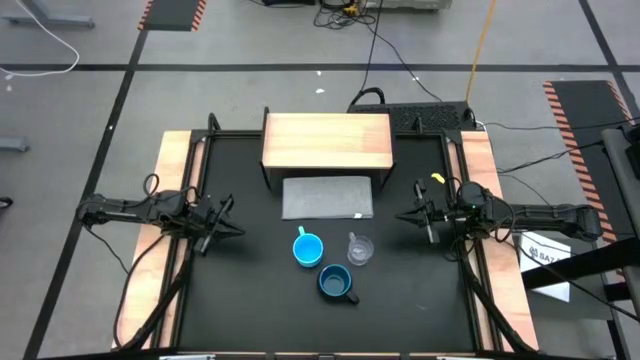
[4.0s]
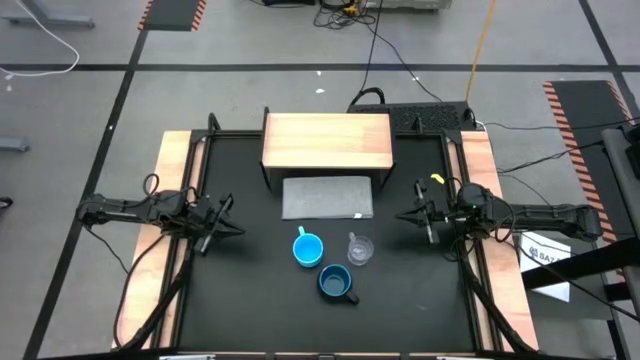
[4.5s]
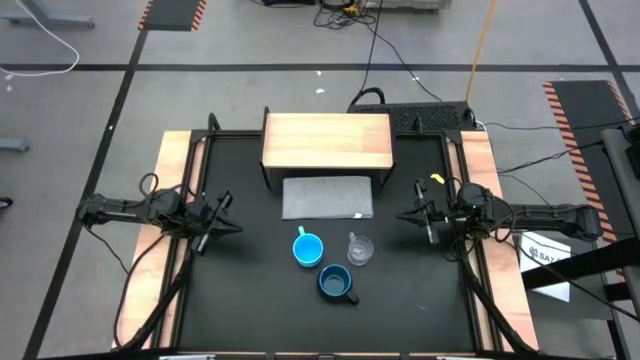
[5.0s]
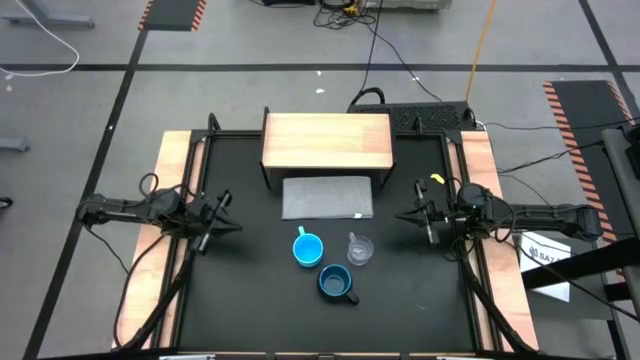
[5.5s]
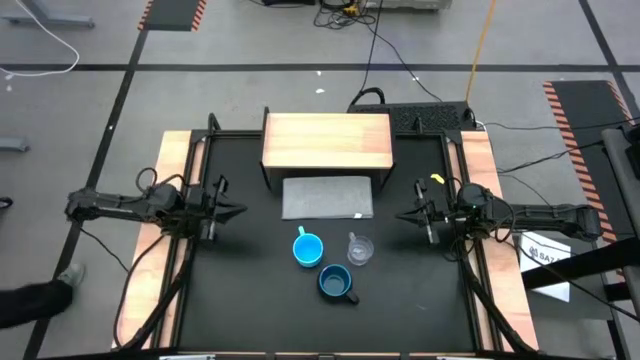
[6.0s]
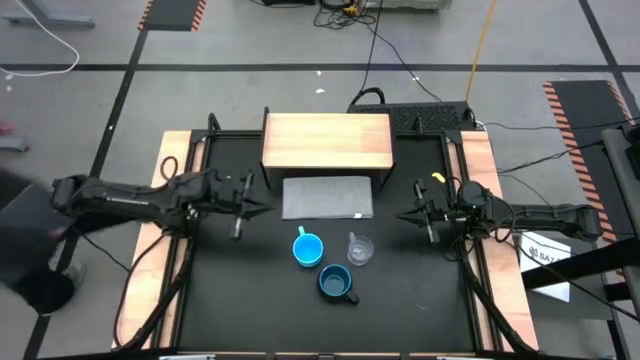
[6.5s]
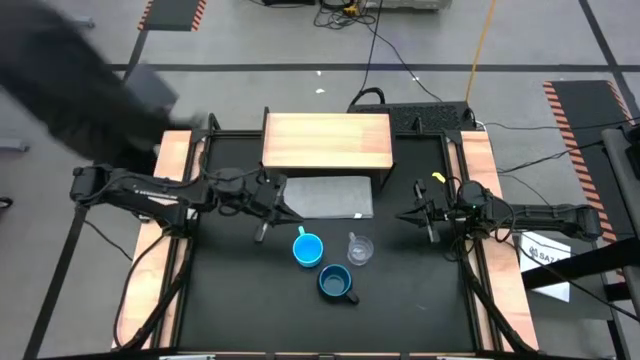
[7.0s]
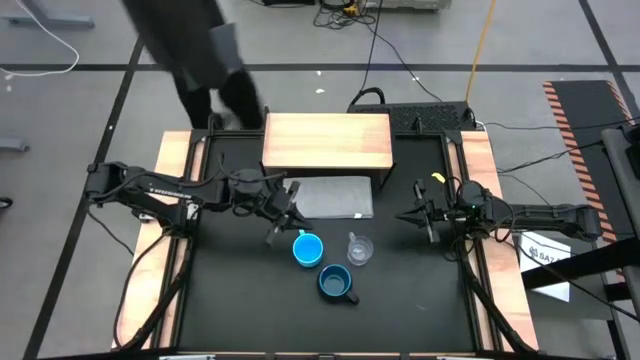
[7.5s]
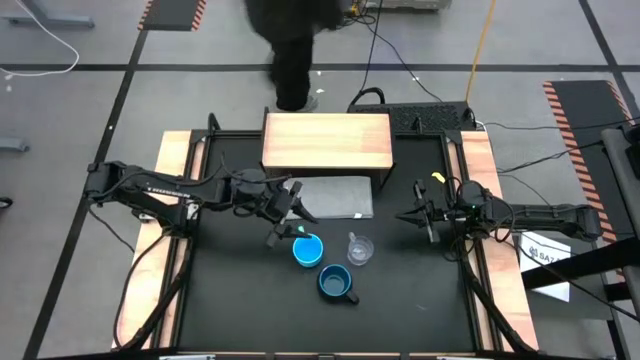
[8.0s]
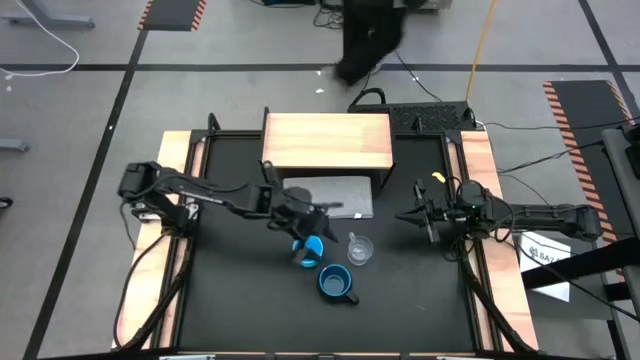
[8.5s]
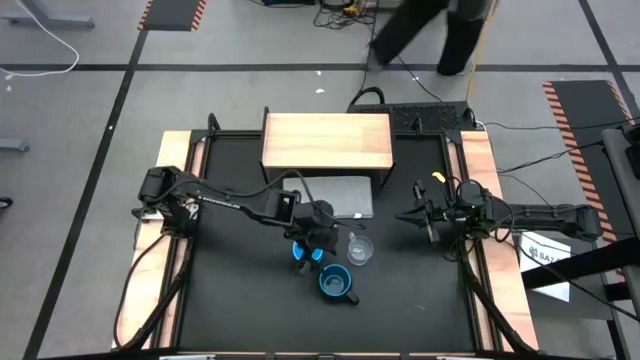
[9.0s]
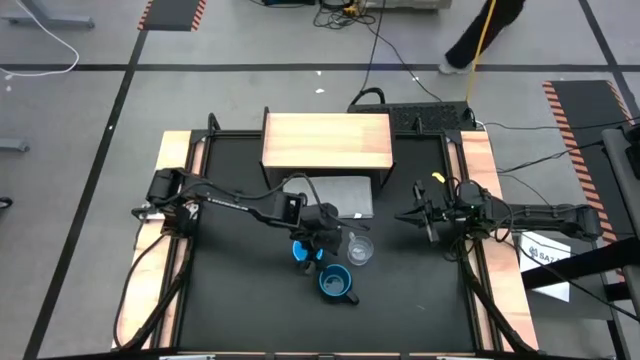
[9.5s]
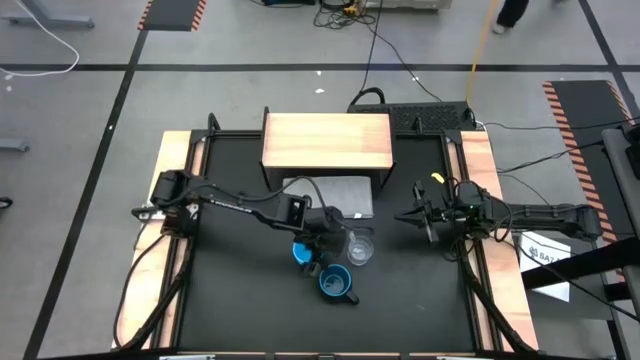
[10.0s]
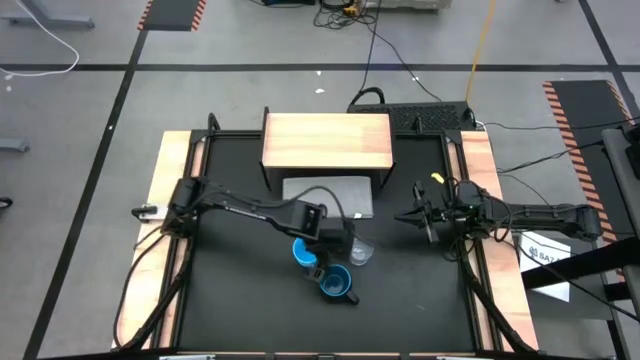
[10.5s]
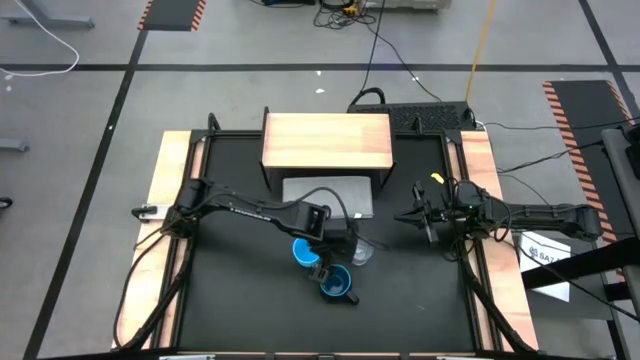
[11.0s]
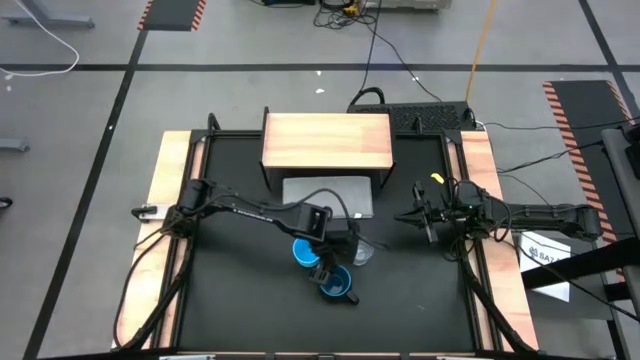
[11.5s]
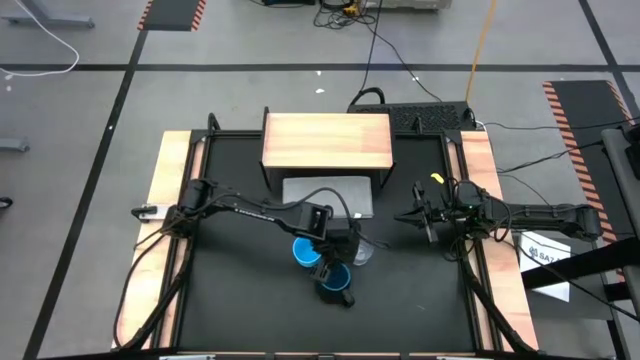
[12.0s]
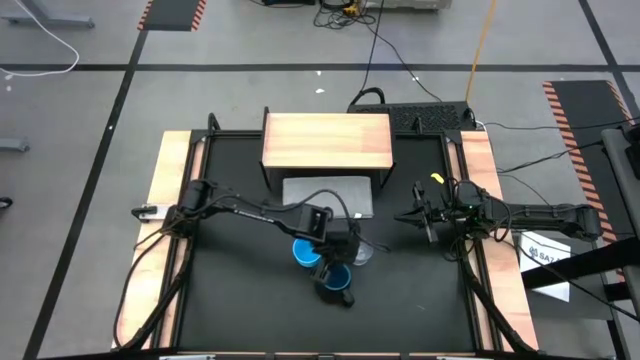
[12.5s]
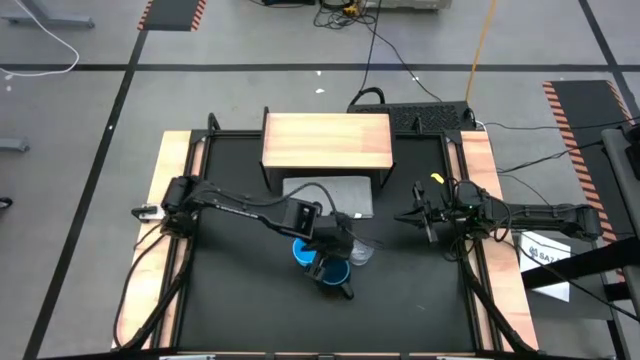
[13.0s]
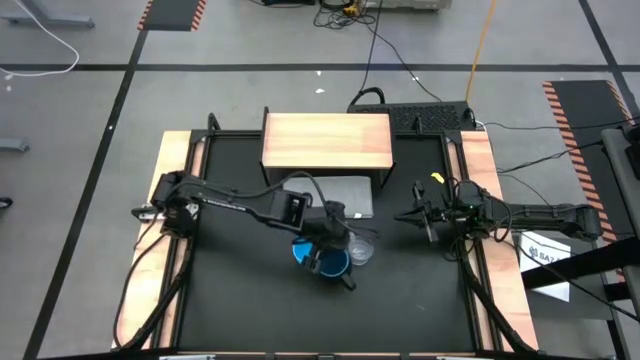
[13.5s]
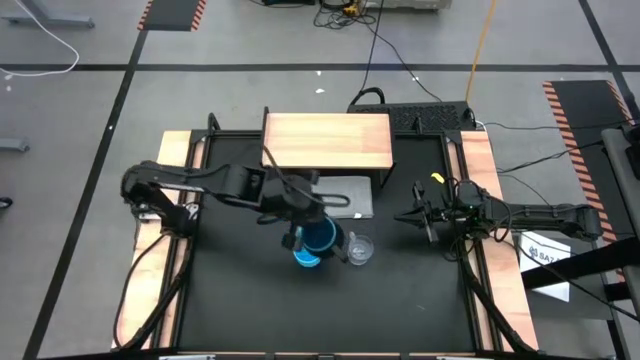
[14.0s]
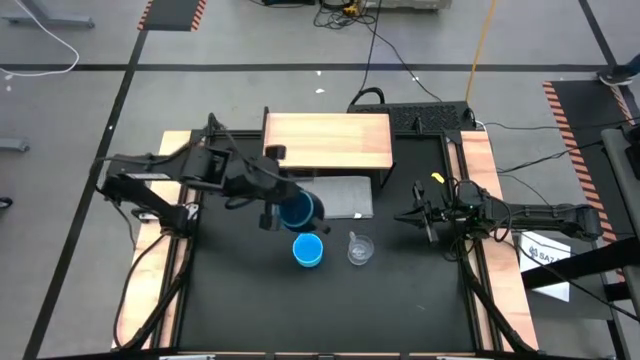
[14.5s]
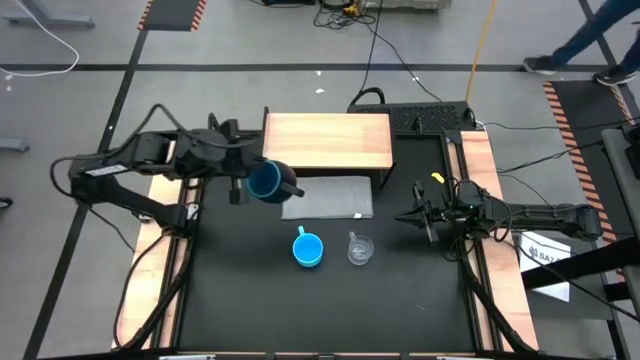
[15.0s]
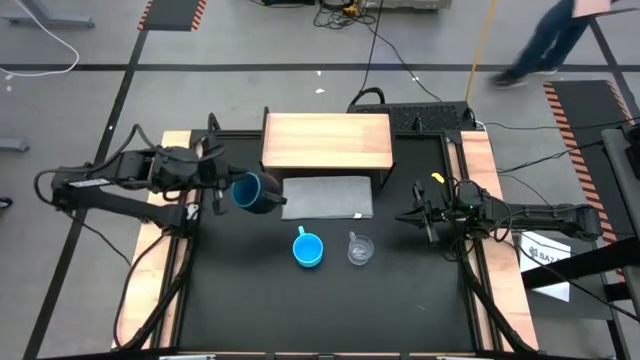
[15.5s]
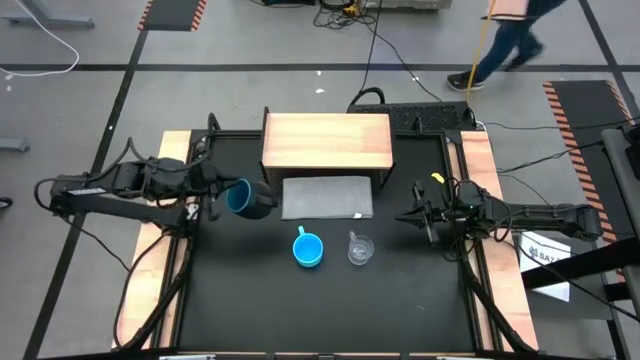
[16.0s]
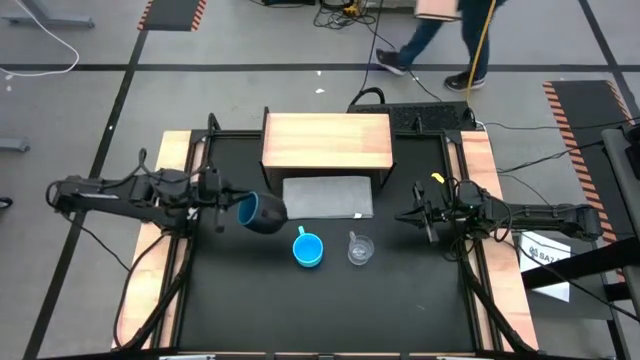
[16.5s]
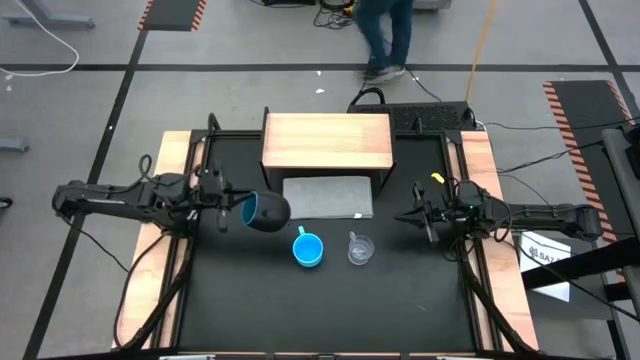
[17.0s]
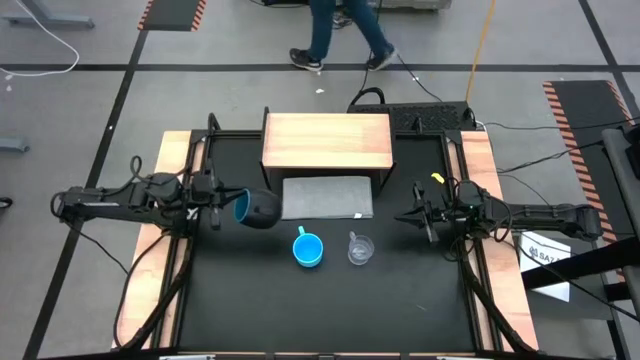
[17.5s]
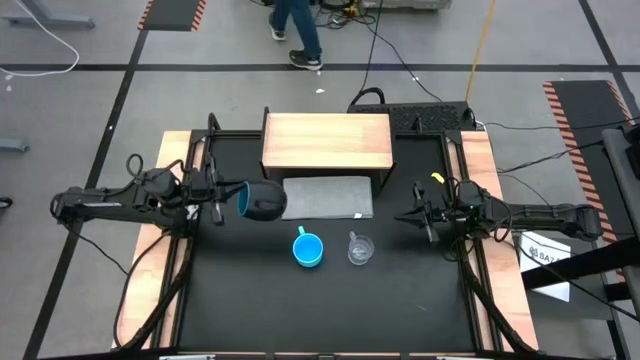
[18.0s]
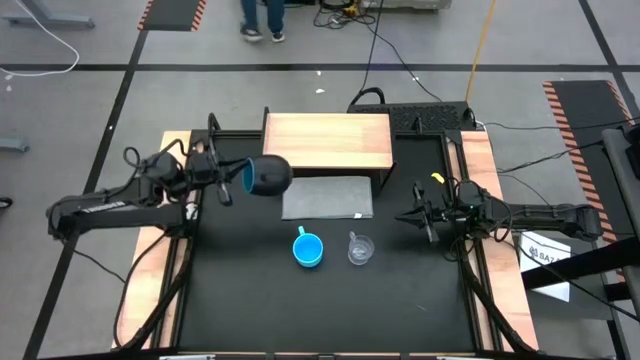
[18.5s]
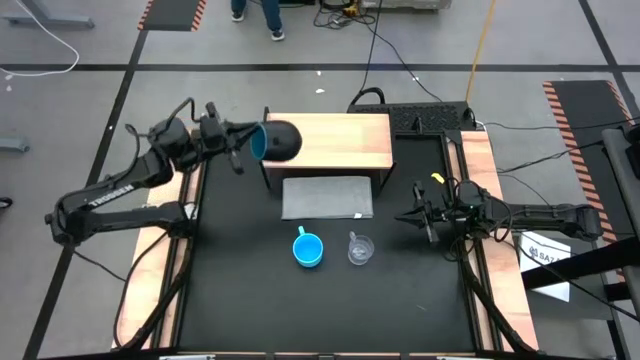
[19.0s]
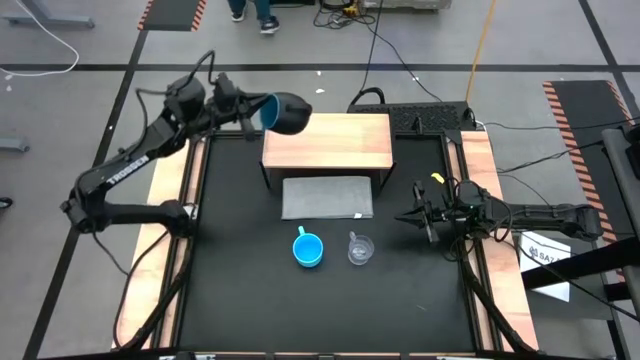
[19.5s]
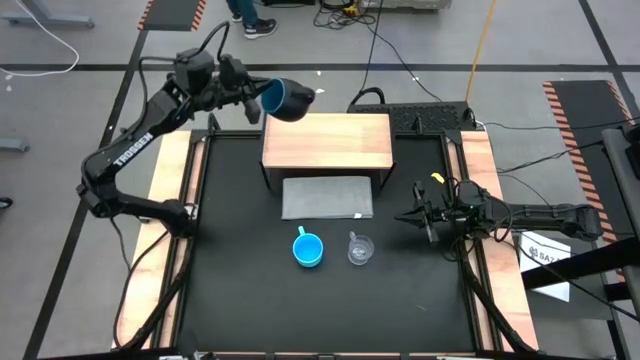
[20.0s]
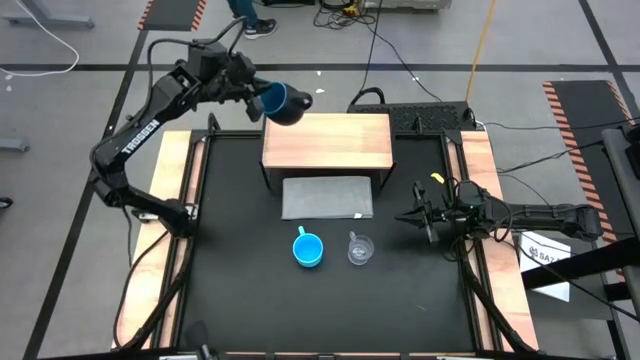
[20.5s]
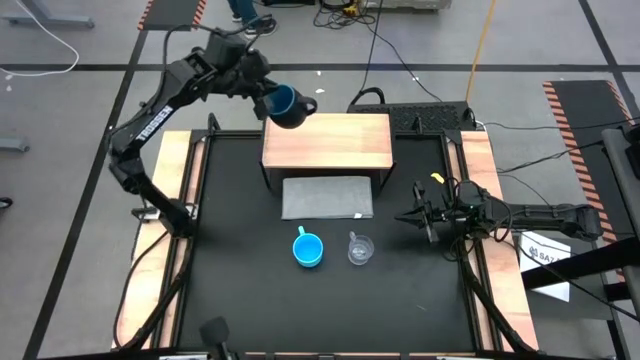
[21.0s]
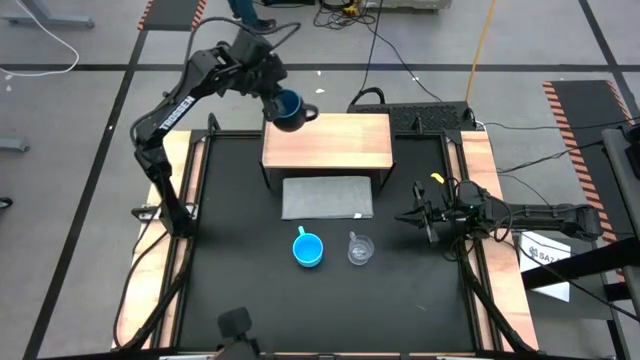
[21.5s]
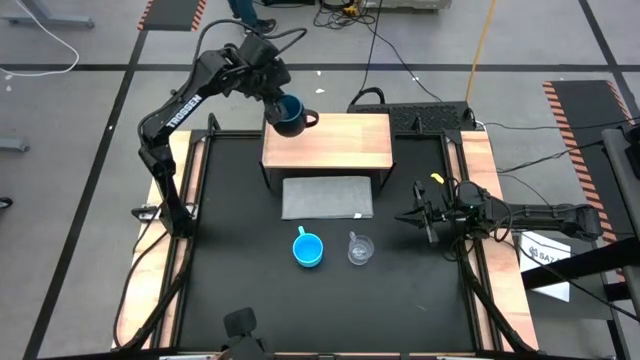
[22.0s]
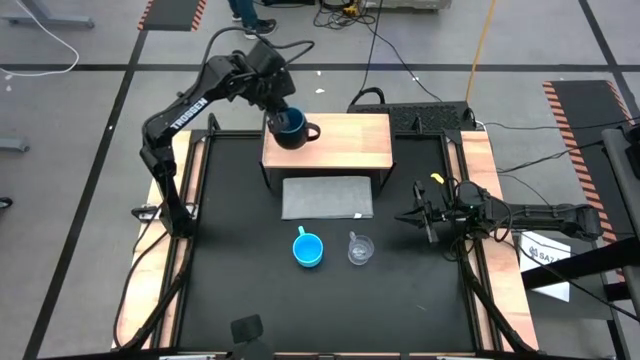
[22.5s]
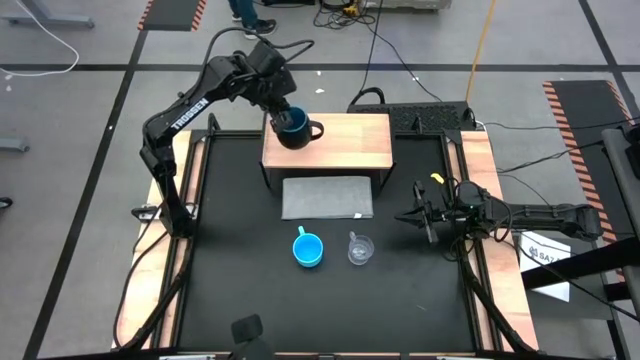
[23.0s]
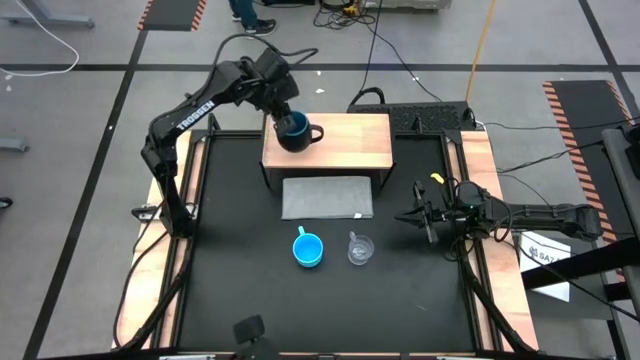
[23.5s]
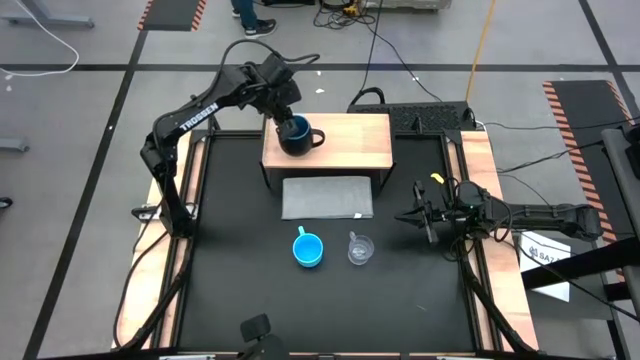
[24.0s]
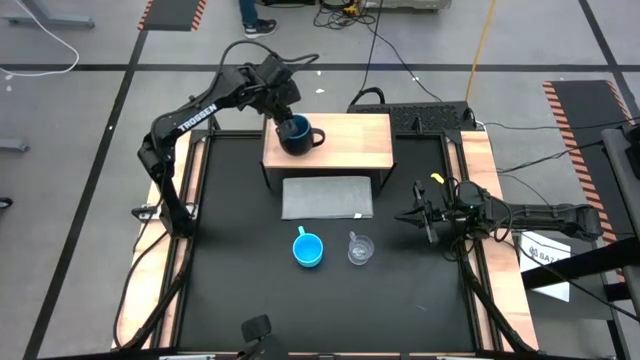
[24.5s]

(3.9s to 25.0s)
Task: Stack small to large cups/mugs on shelf
Put the black mug on the shelf
